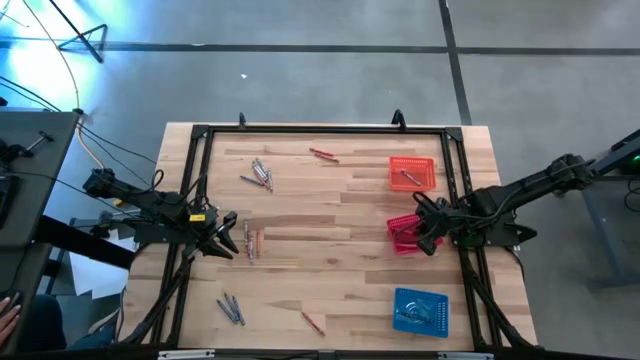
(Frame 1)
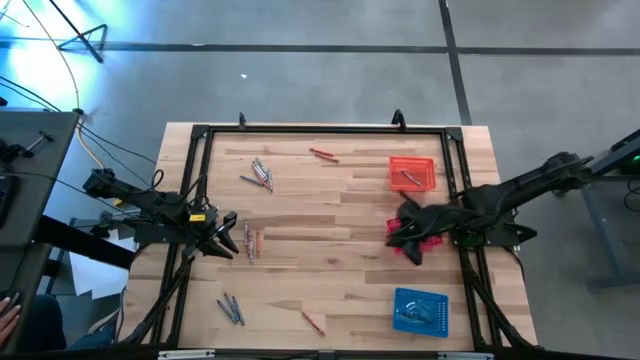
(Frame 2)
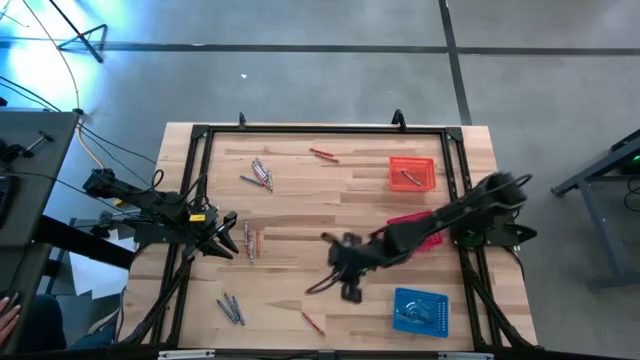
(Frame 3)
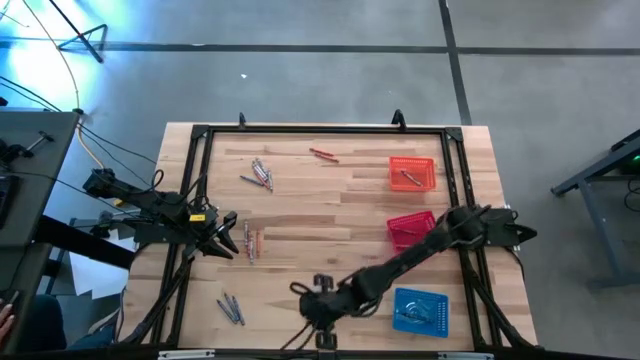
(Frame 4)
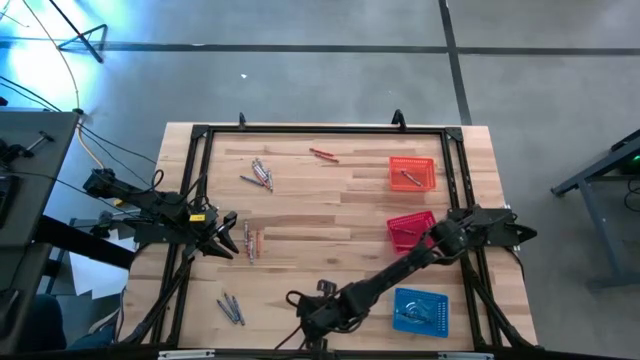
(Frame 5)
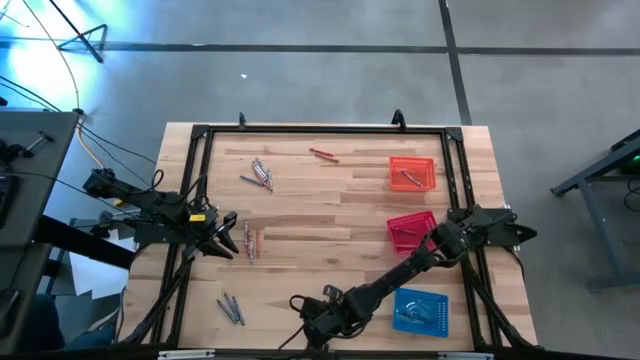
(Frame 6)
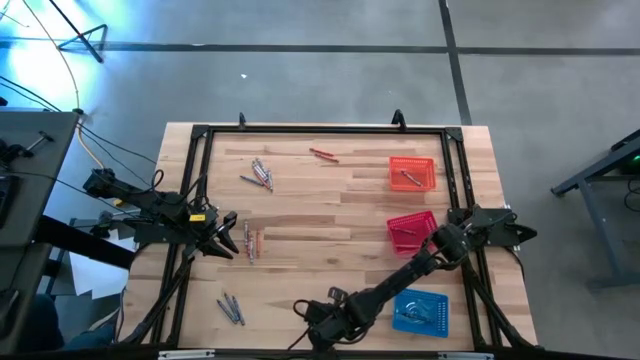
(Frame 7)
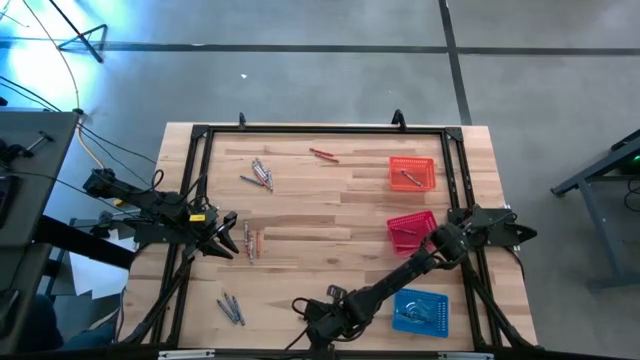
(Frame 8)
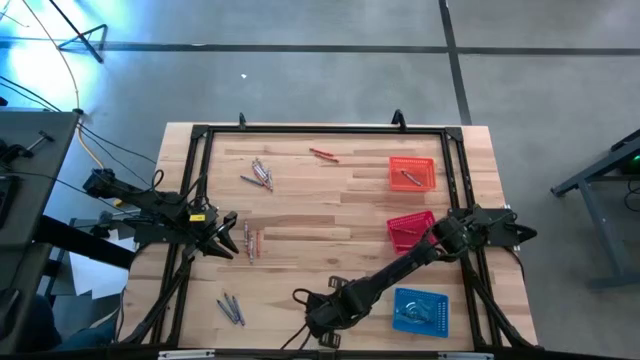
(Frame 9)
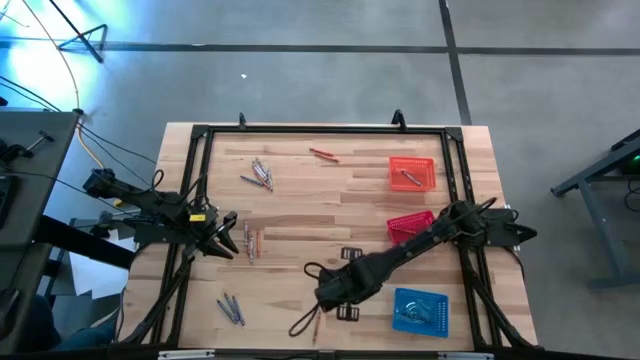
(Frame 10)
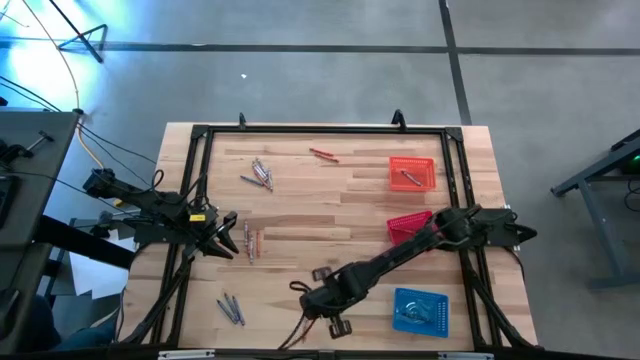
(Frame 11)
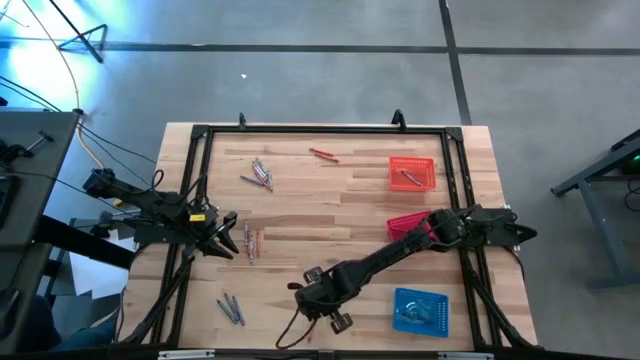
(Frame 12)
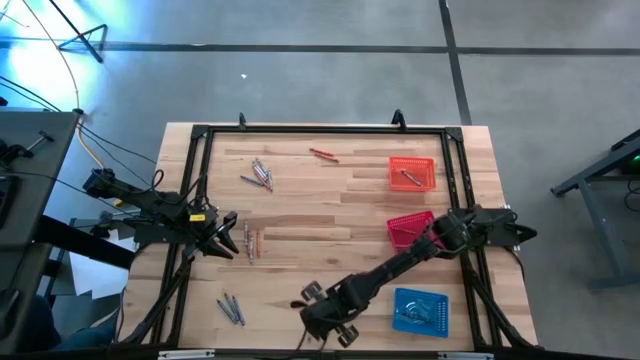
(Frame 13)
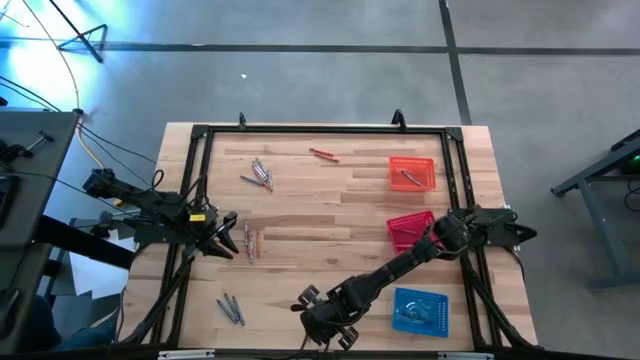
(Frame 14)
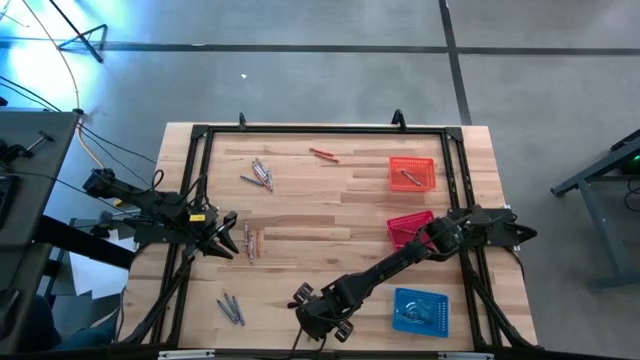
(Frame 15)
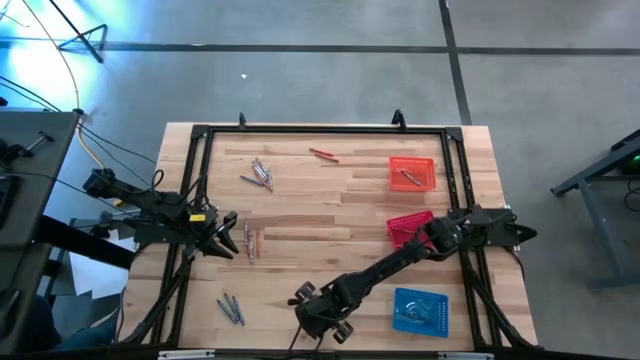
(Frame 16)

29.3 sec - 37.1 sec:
Task: Sort crayons
Put the orange crayon into the red bin

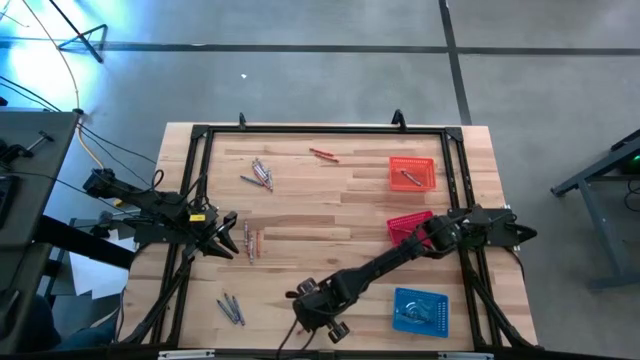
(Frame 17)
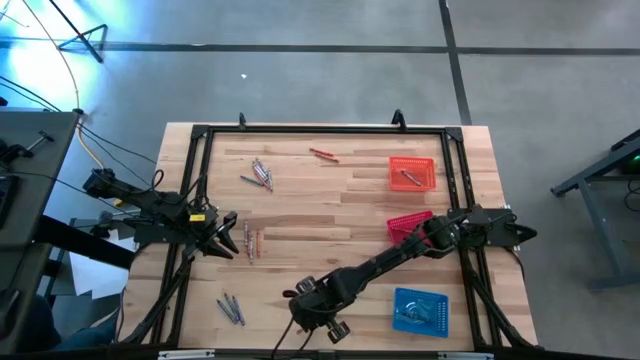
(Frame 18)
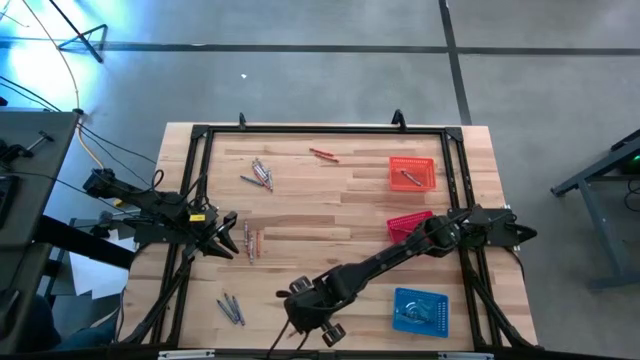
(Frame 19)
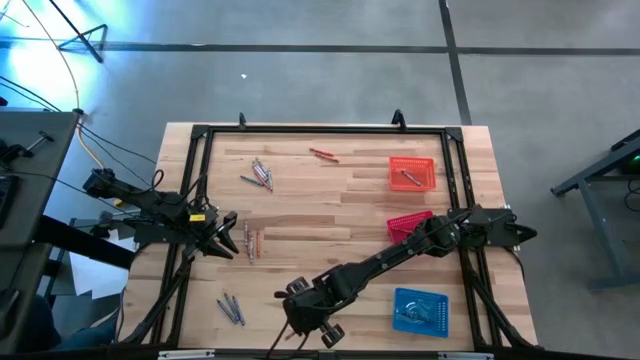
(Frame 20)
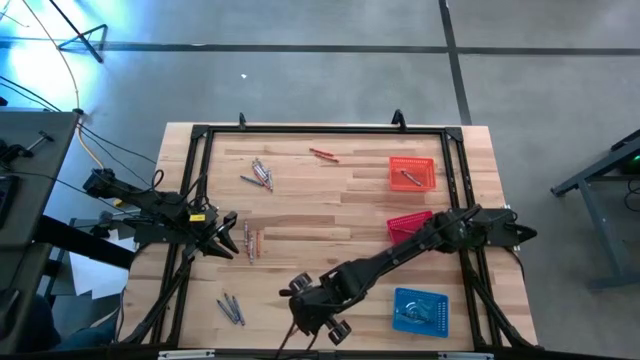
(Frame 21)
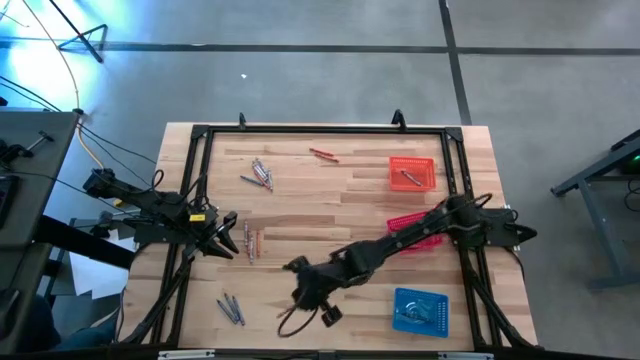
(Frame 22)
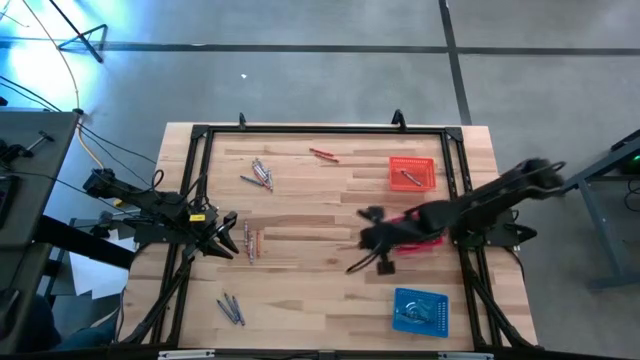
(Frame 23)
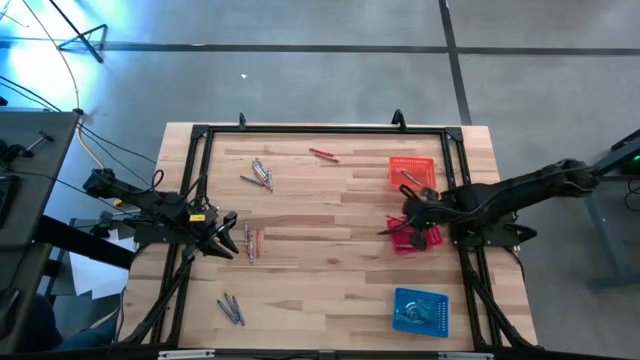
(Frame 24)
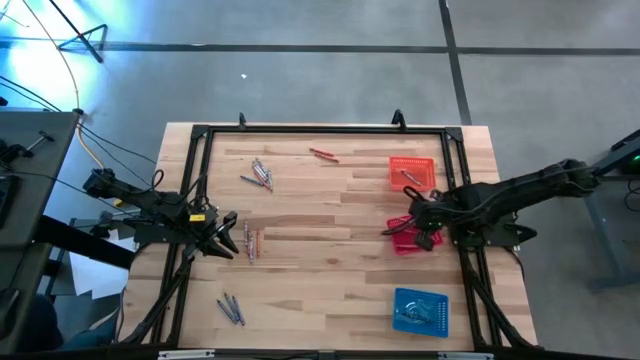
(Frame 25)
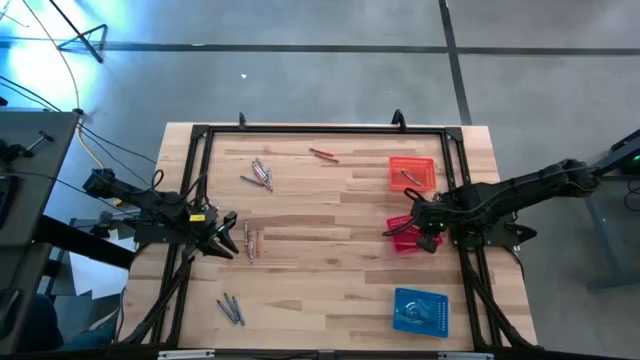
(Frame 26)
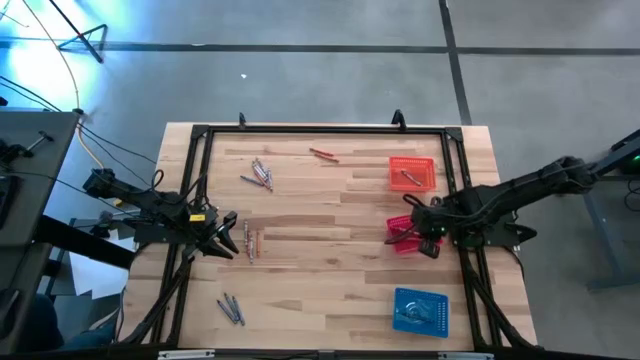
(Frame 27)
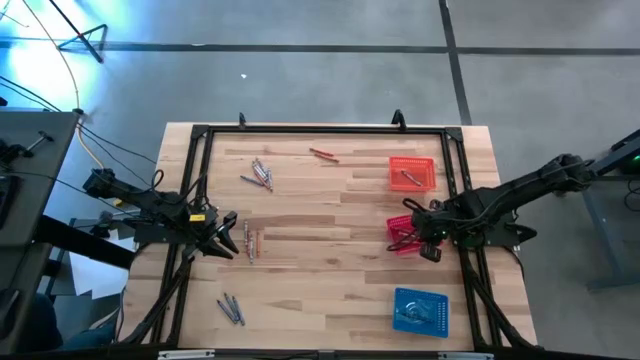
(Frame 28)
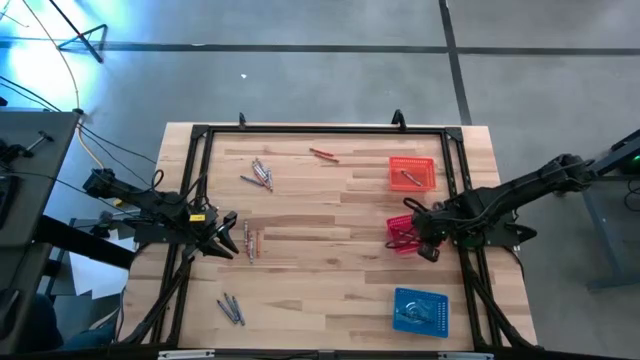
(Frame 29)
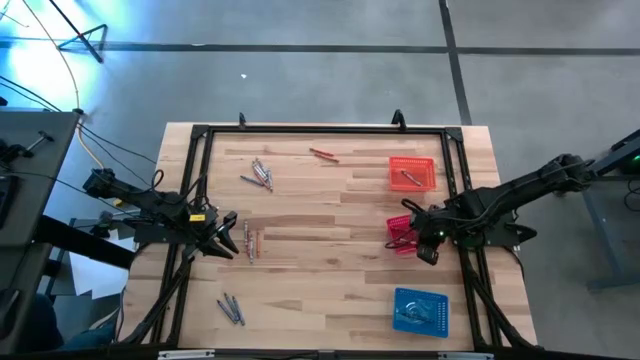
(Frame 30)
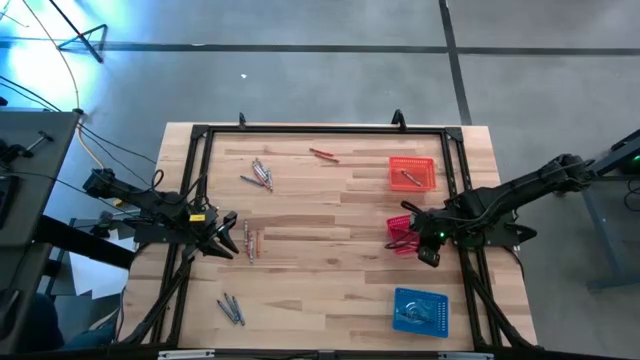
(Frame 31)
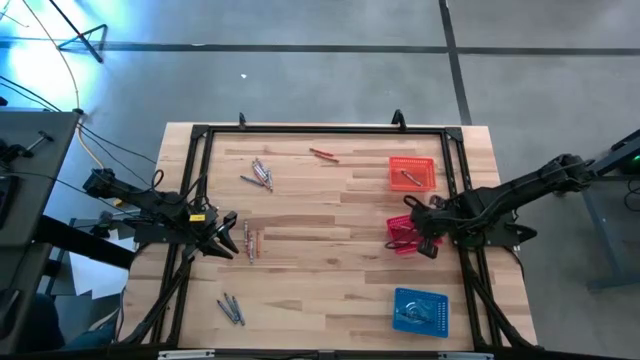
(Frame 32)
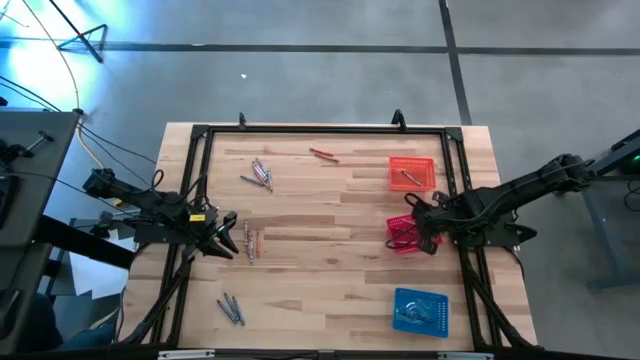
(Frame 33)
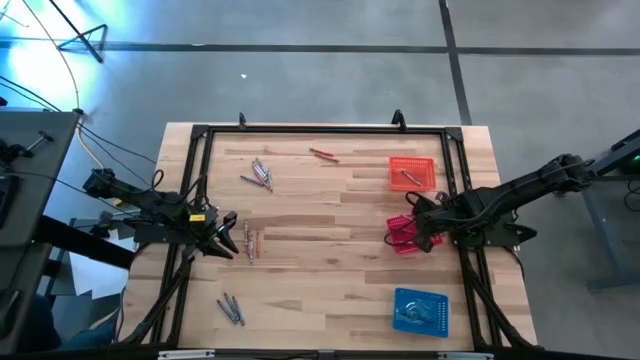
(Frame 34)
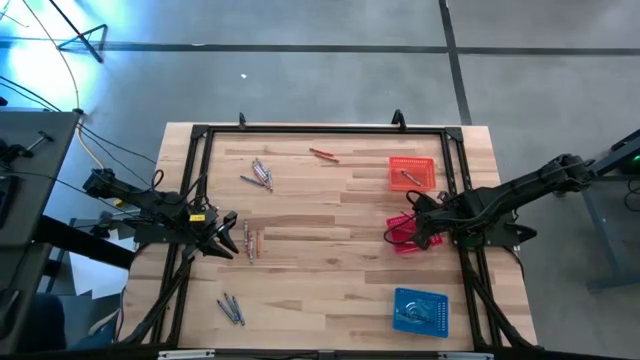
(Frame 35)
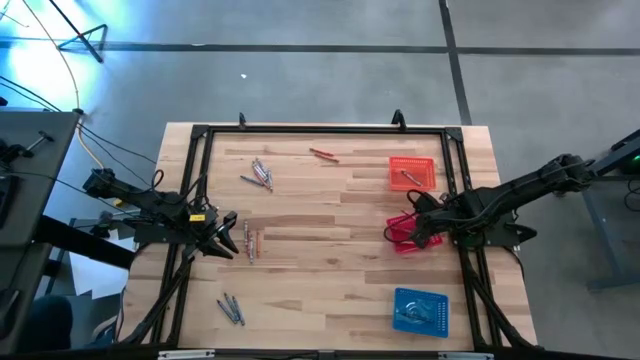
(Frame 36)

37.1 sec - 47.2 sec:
Put the orange crayon into the red bin

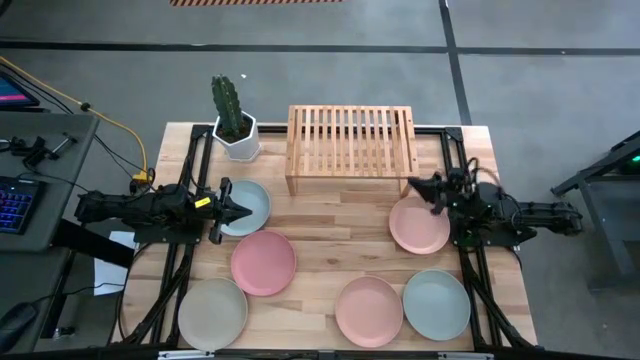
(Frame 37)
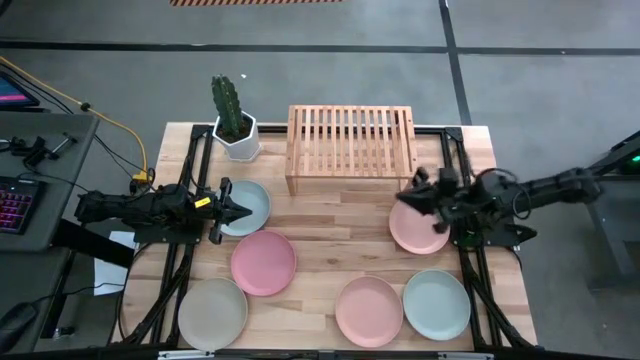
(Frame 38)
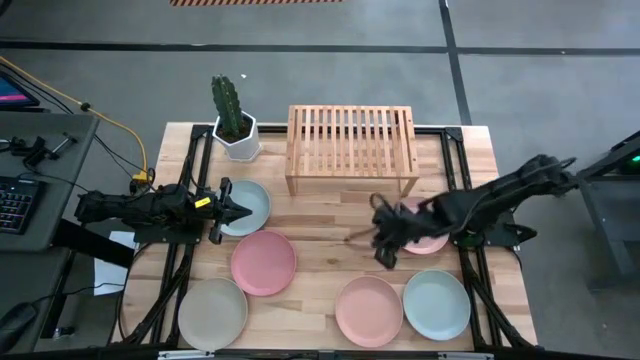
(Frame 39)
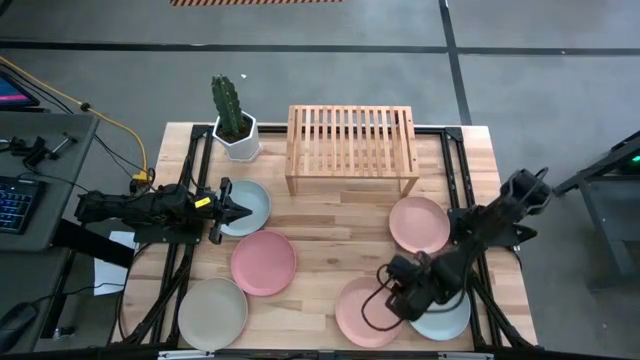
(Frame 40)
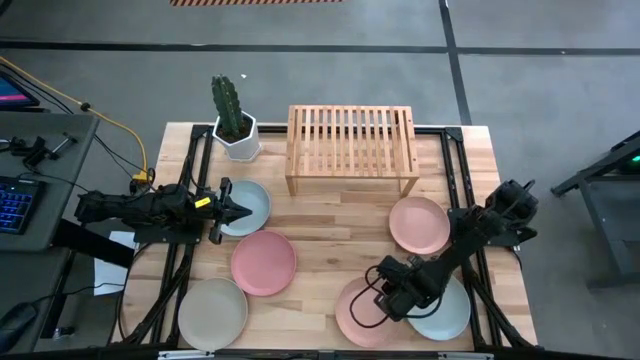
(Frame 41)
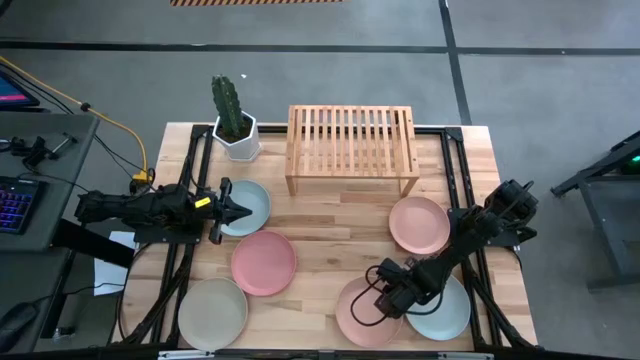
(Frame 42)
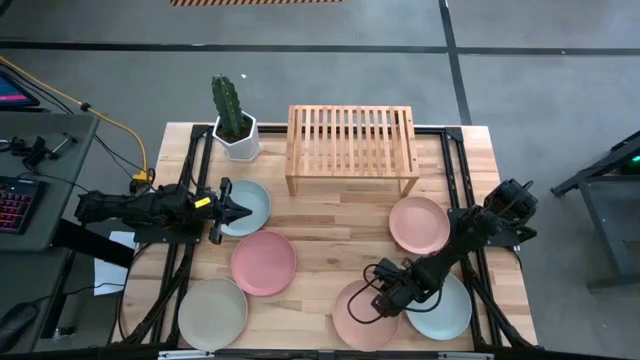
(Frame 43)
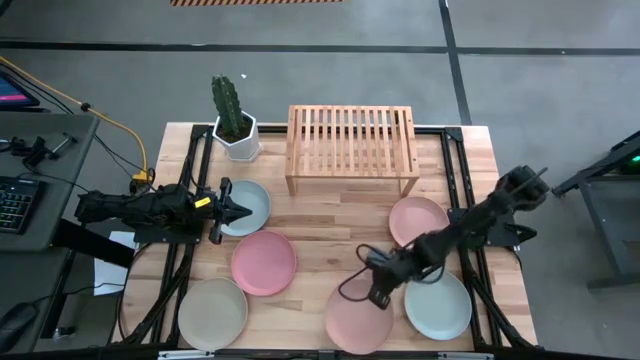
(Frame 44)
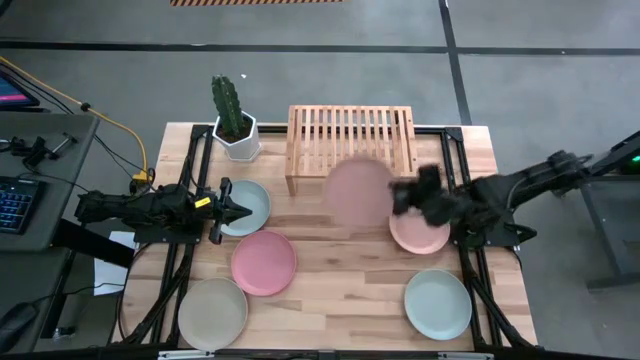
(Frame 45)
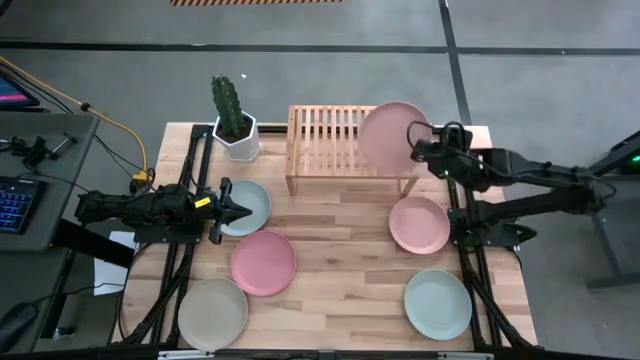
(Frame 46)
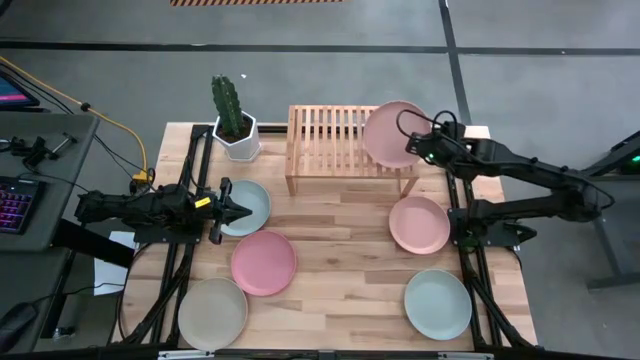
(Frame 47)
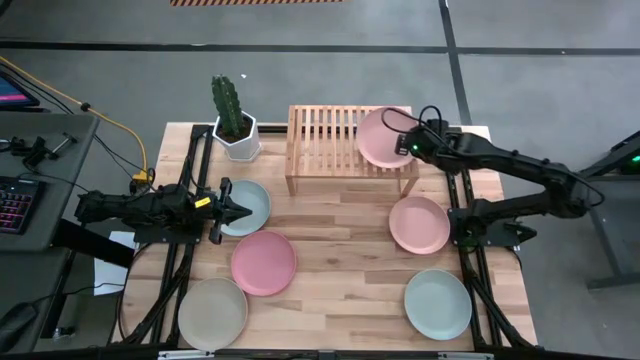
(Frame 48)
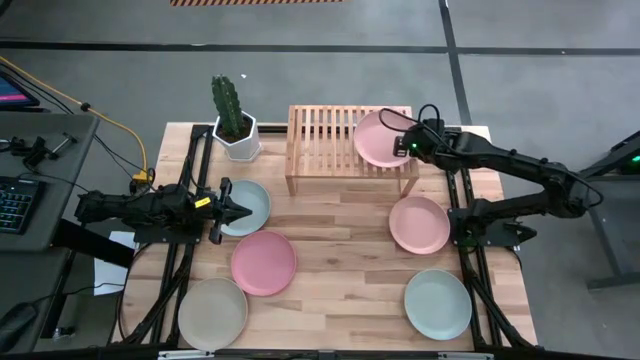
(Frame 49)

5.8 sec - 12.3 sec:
Task: Place and stack plates onto a shelf
Put the bottom light pink plate on the shelf
